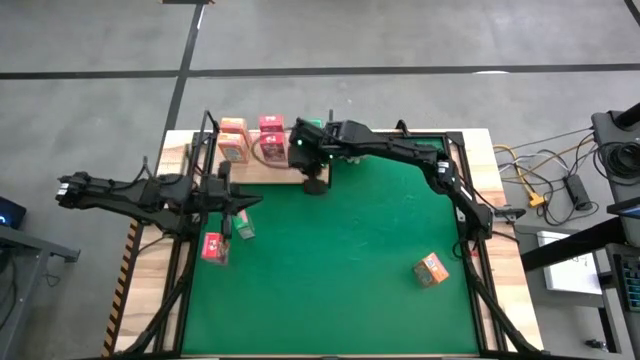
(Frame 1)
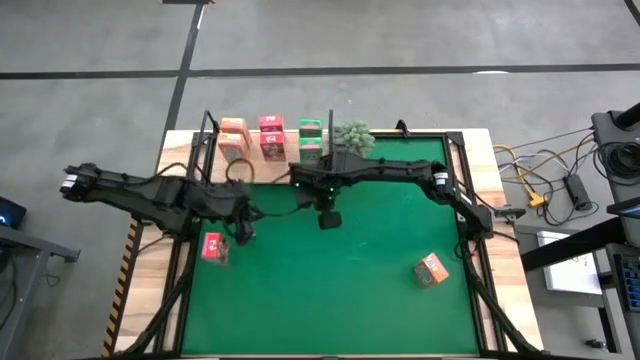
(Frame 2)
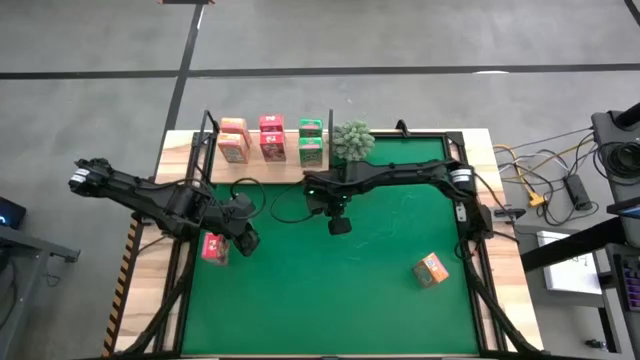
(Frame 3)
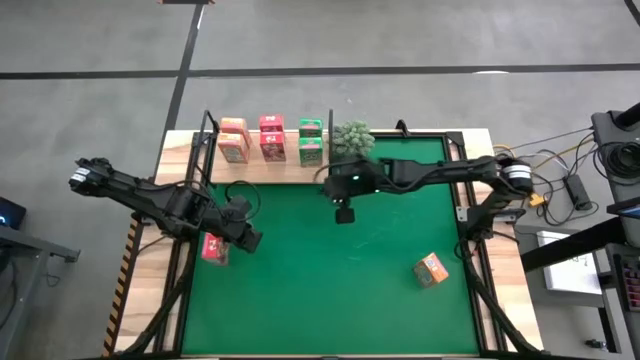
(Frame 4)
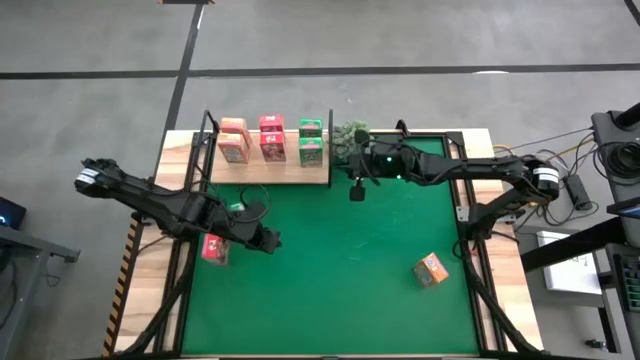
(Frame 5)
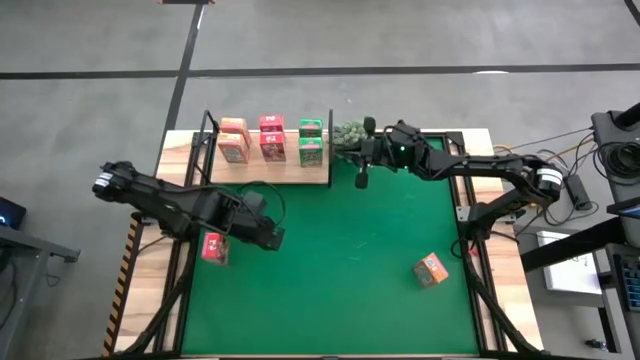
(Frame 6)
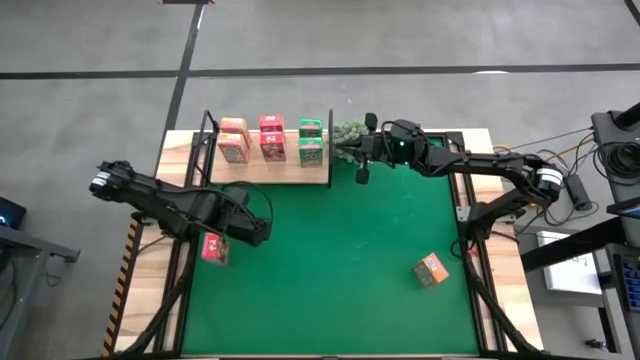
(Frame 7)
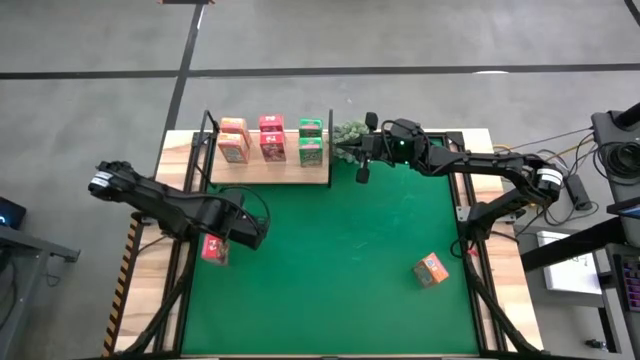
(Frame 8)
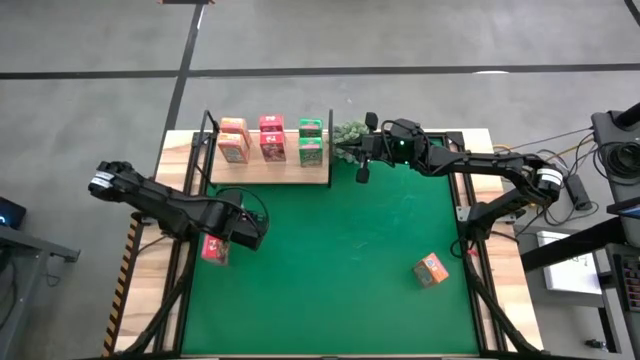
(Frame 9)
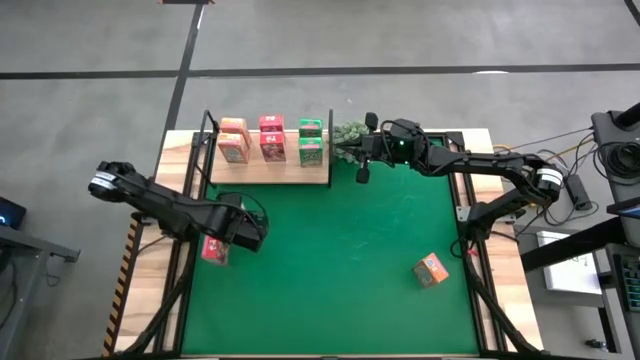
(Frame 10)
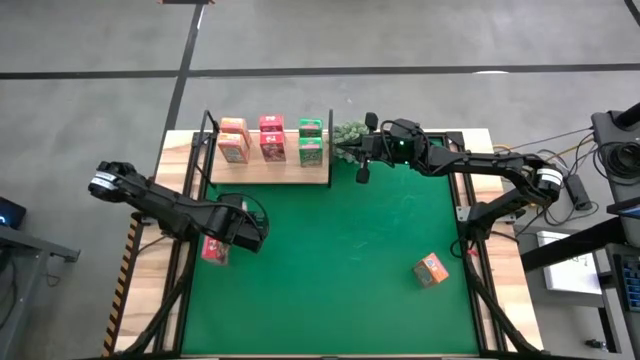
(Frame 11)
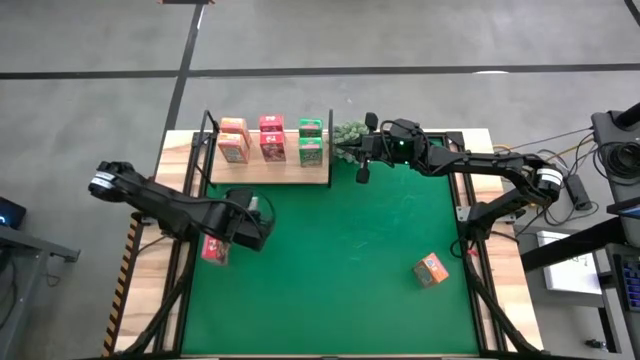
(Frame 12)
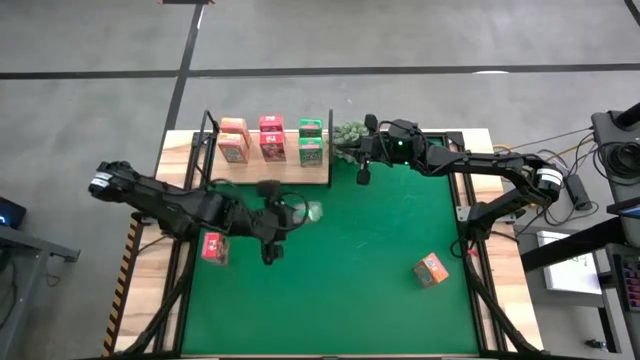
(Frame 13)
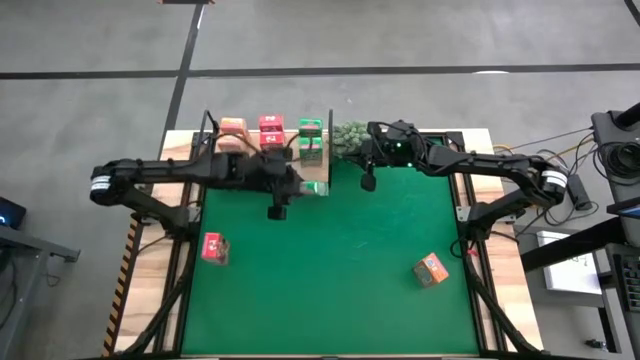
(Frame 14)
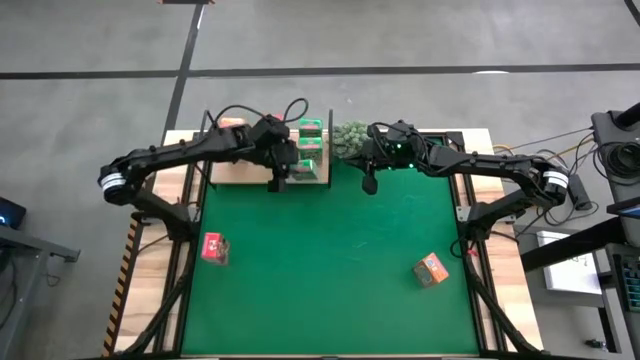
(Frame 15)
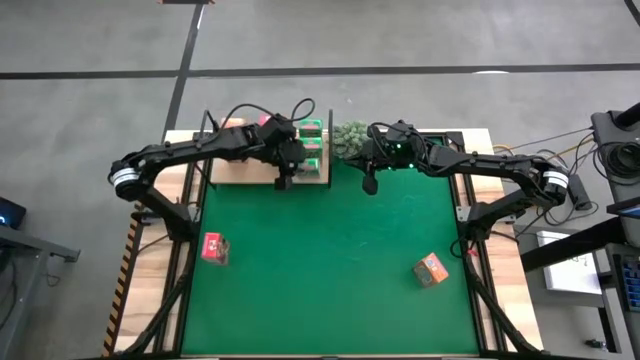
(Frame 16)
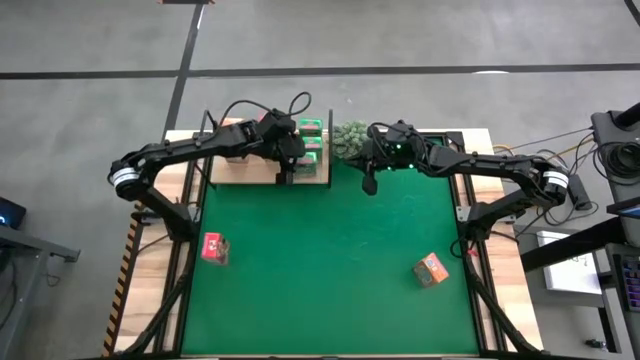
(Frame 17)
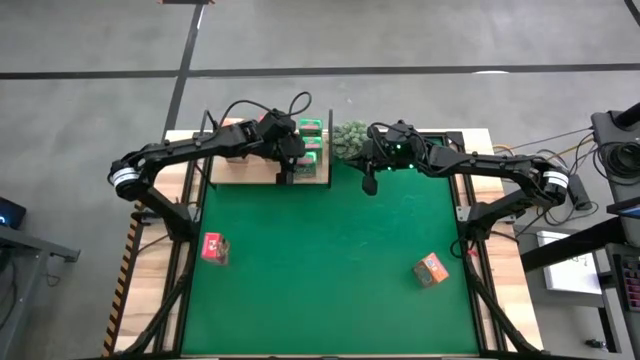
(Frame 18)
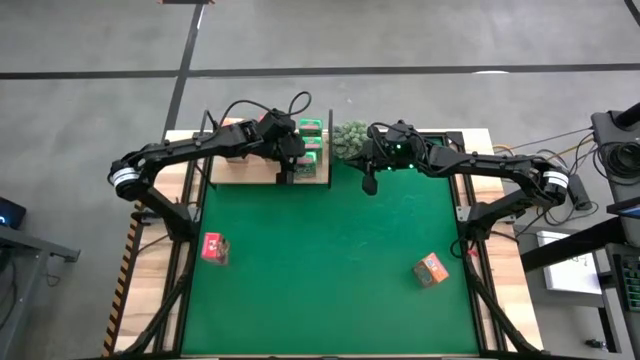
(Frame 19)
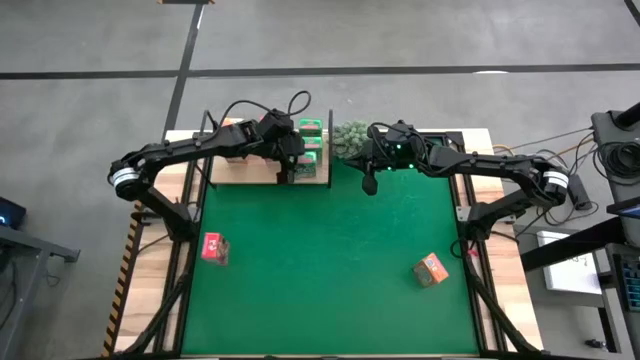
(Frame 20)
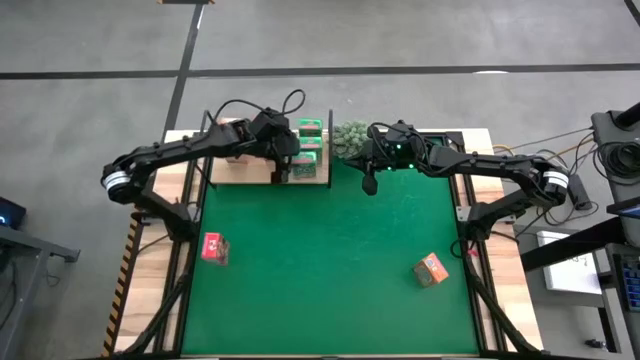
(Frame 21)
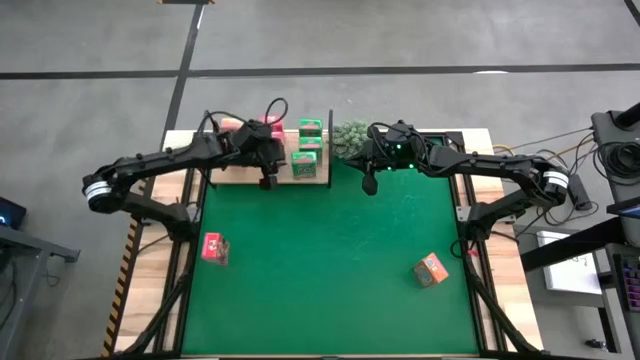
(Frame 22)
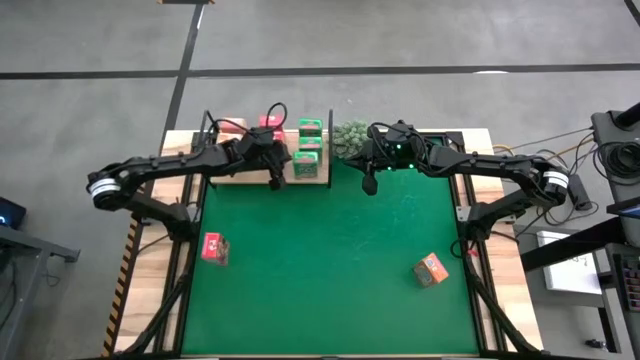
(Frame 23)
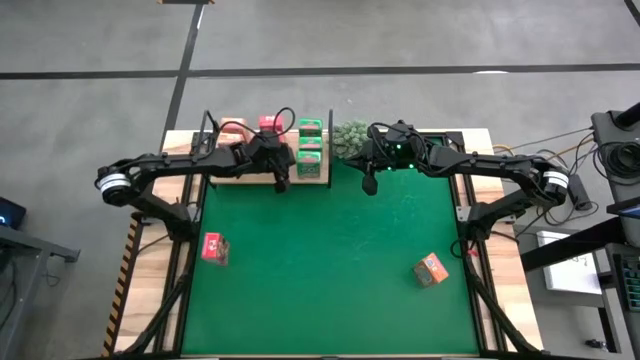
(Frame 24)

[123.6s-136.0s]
Task: Stack cereal on shelf
Put the green cereal box on the shelf aligned with the other green cereal box
